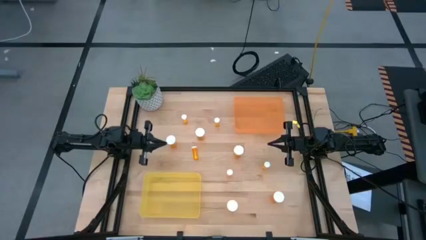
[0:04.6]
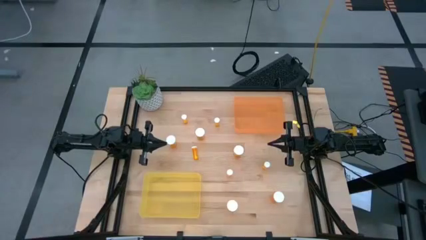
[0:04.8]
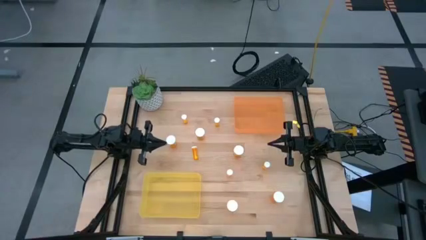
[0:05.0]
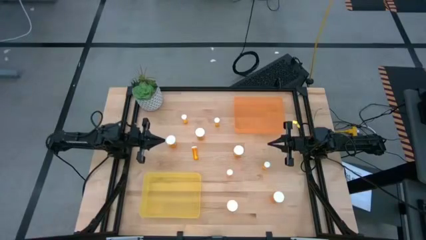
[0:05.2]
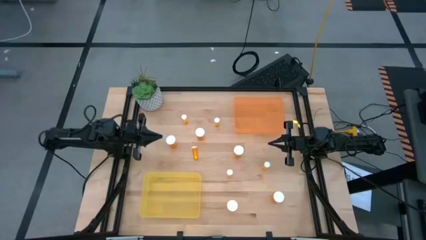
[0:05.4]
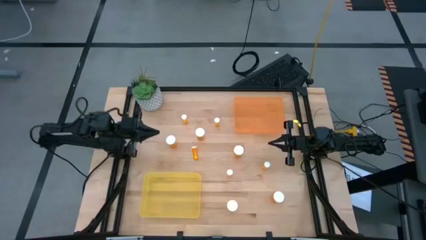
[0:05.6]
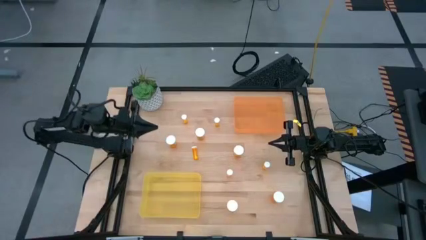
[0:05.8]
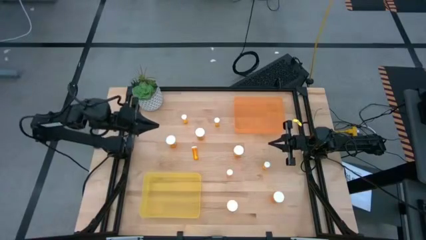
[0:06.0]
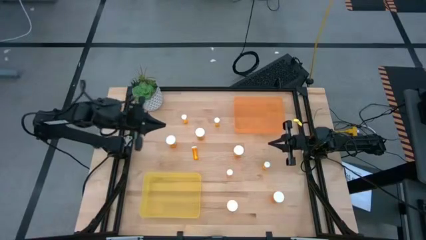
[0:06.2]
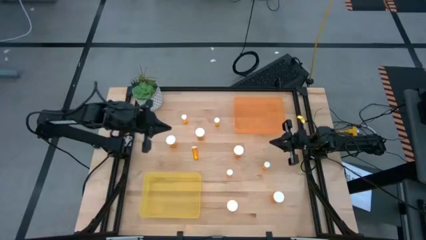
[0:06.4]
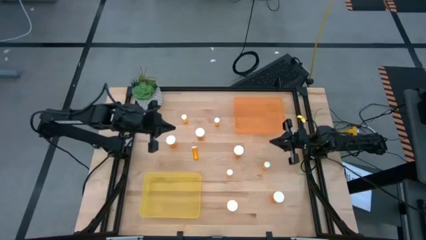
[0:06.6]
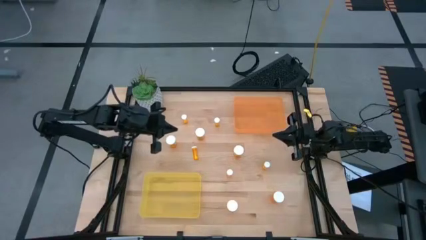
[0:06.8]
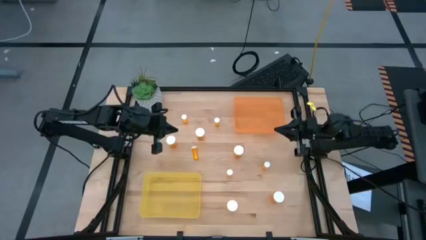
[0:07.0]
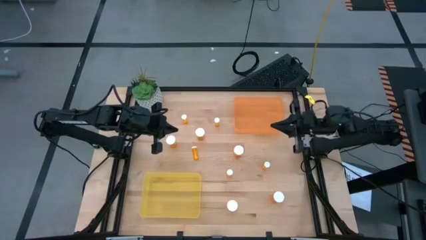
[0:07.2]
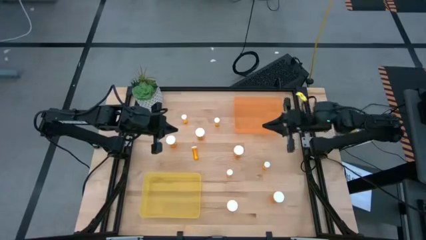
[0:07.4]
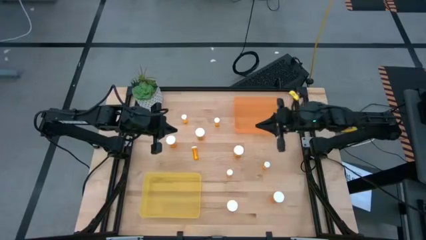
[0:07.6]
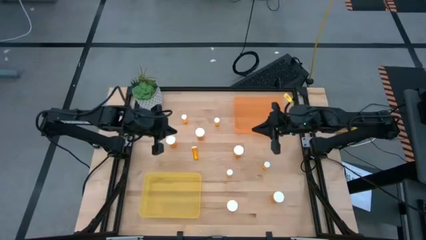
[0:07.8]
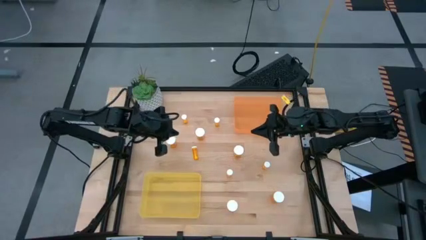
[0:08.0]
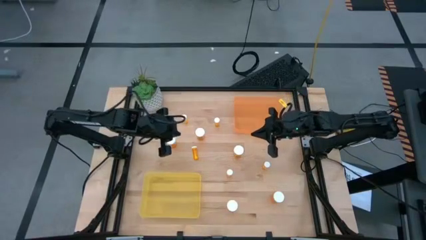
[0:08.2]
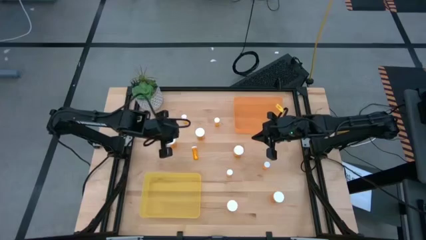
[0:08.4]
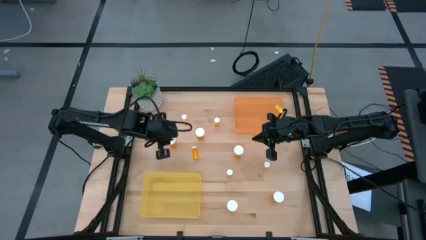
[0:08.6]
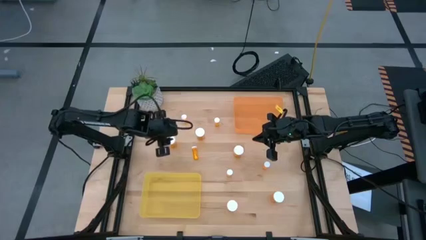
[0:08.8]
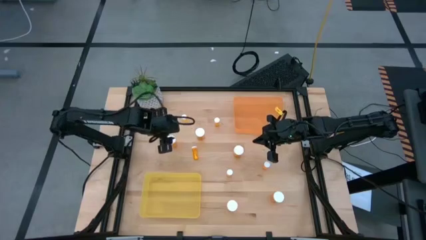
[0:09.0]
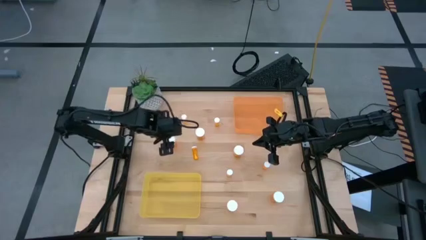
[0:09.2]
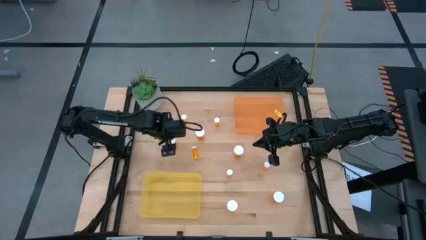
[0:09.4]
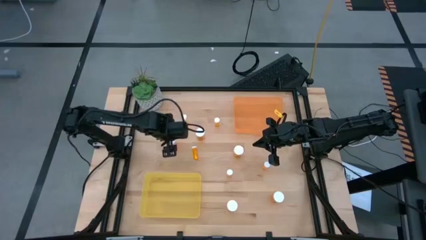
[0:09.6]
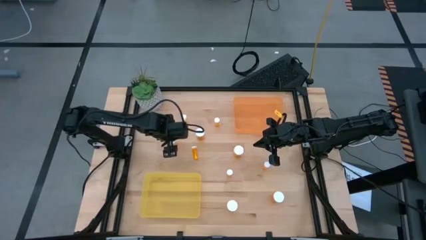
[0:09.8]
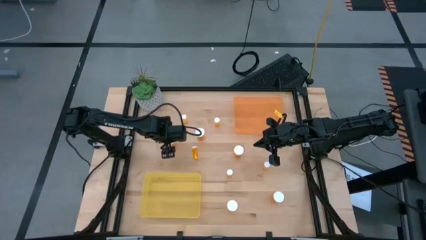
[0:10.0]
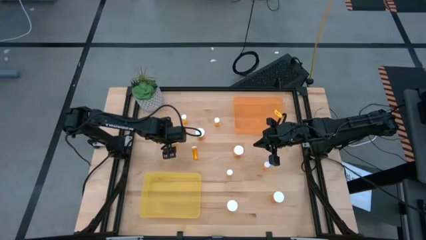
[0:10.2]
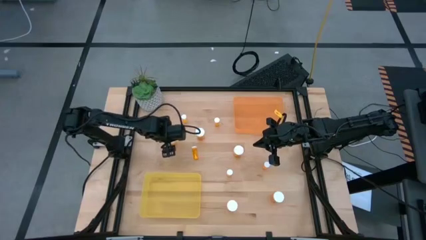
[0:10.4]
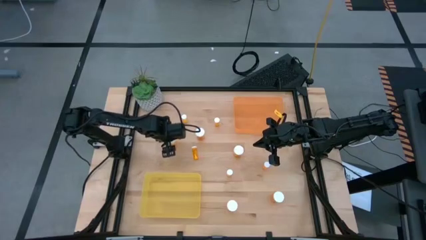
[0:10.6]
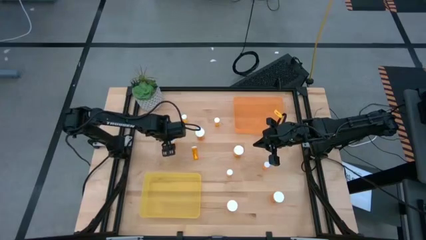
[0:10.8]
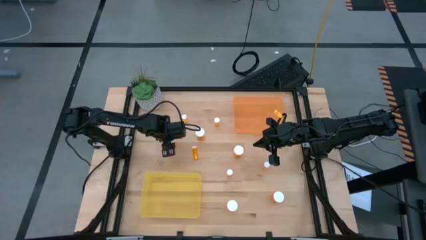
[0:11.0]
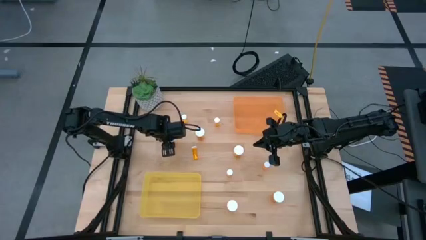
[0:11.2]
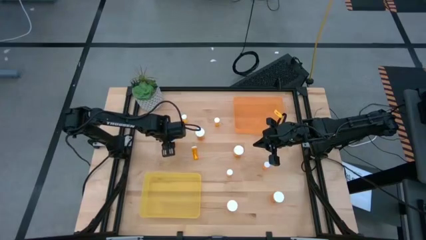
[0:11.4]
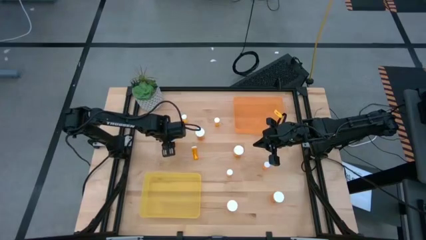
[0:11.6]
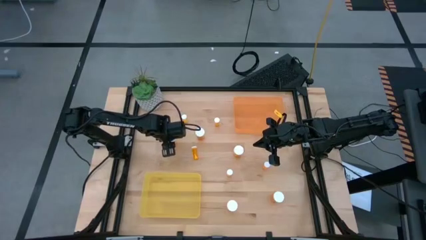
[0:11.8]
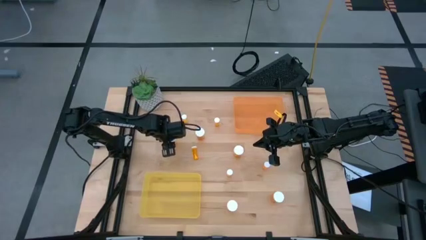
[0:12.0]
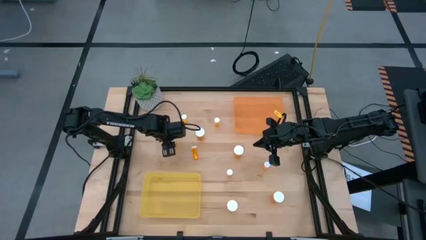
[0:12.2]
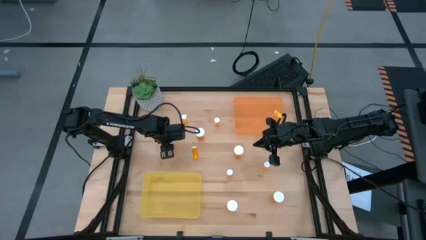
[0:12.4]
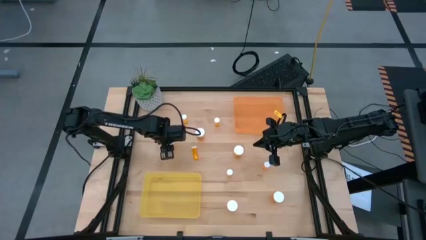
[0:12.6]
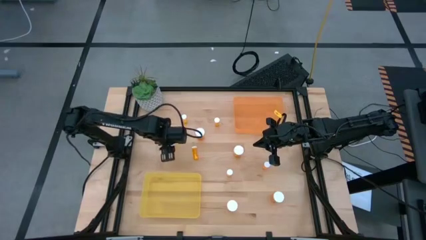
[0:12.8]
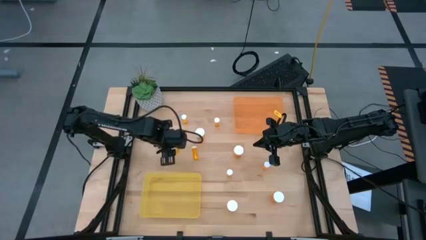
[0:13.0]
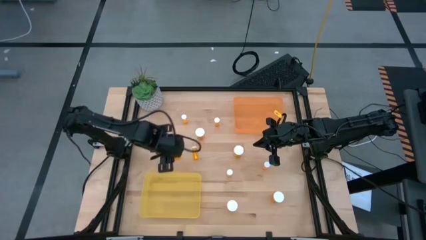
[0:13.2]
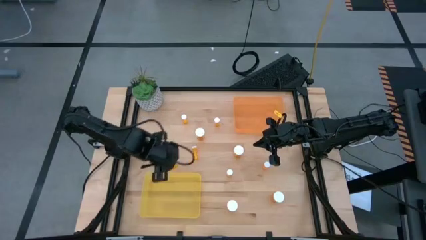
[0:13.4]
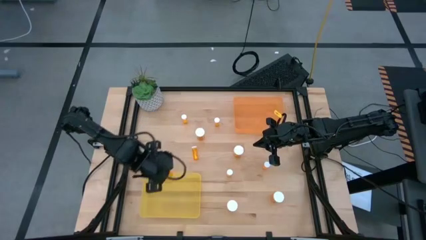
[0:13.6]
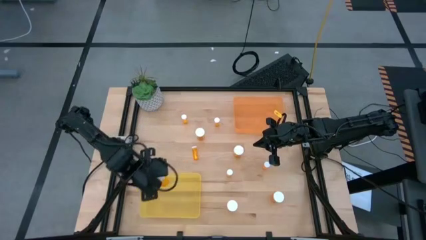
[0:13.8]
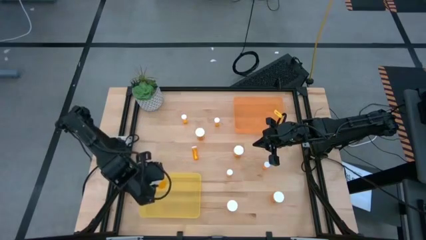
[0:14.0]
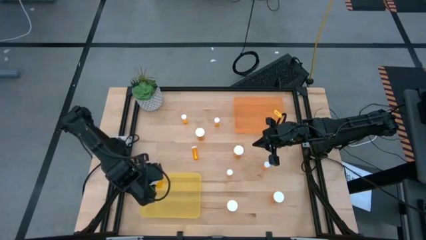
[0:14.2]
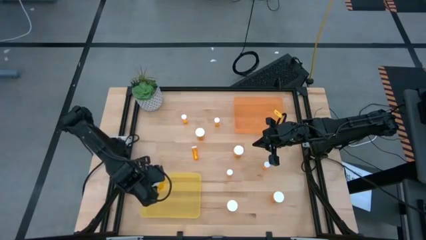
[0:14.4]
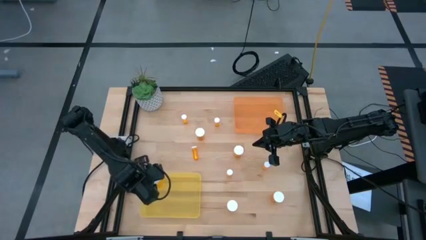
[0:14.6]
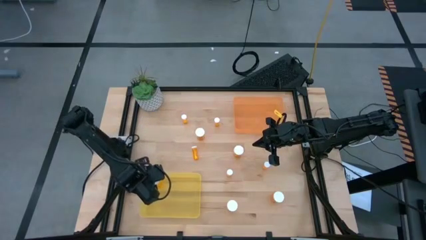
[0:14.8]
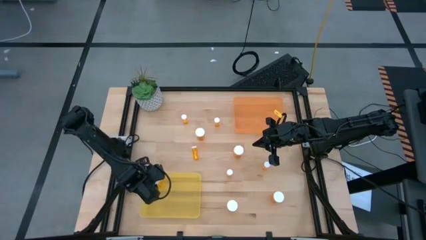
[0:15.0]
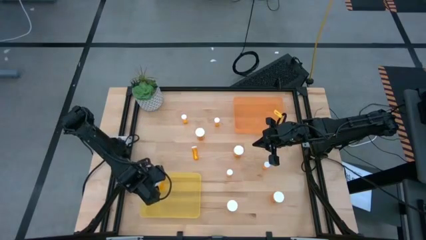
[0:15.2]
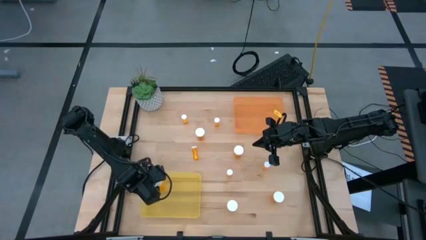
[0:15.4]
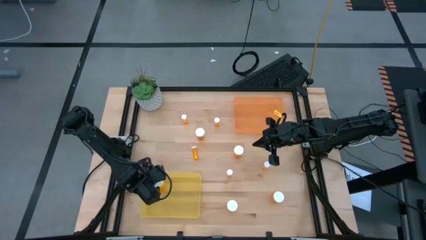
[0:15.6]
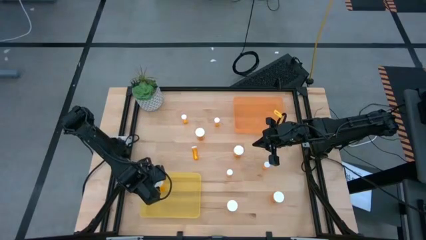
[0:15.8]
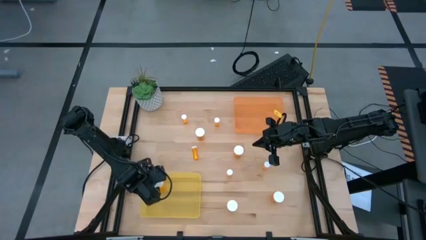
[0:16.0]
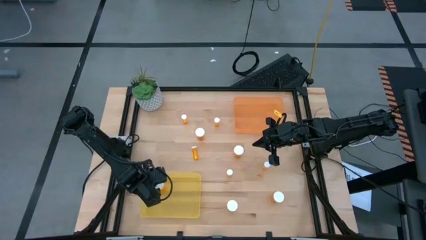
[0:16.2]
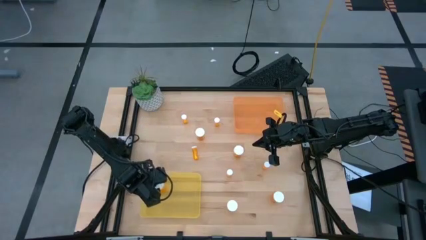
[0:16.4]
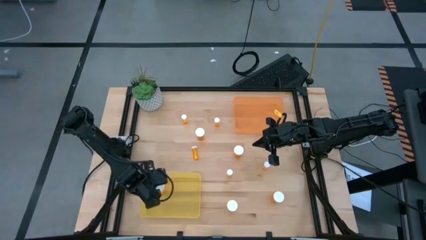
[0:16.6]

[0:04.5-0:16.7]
Task: Pick and place medicine bottles into bin by pill shape (circle, oval)
Put the large pill bottle into the yellow bin
